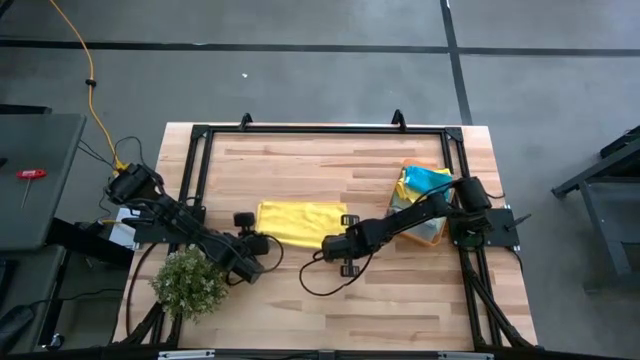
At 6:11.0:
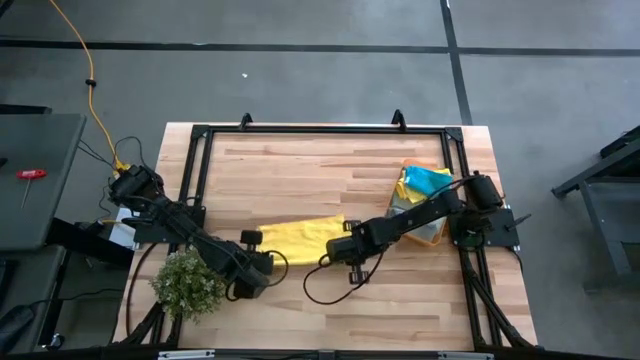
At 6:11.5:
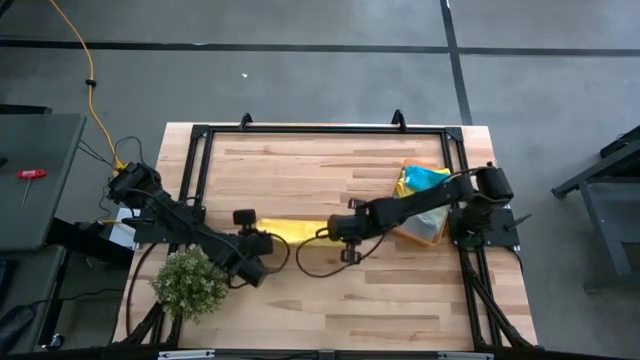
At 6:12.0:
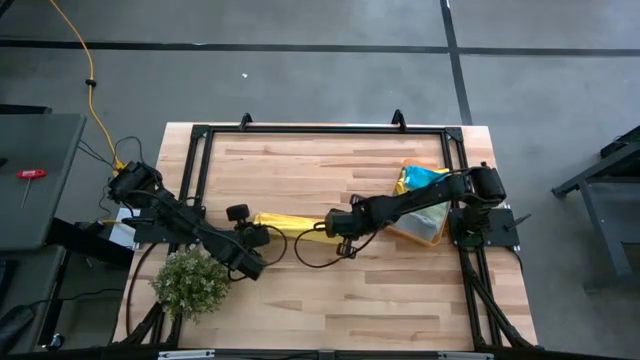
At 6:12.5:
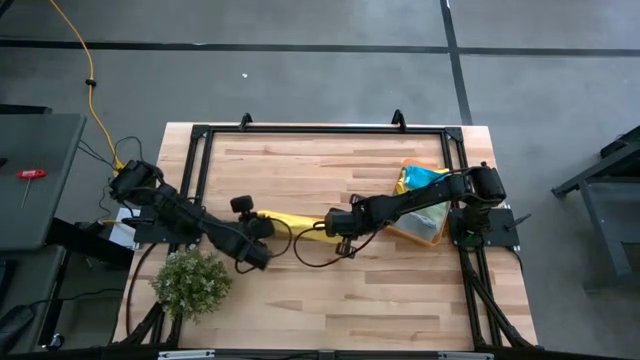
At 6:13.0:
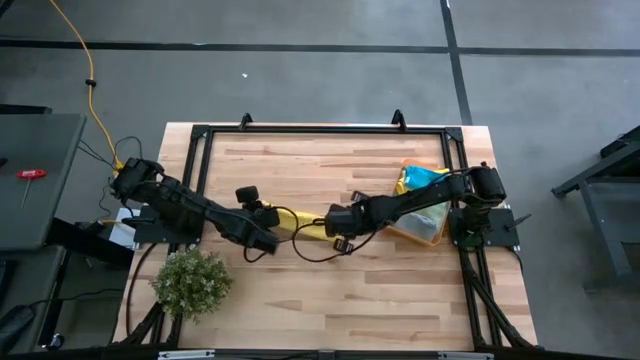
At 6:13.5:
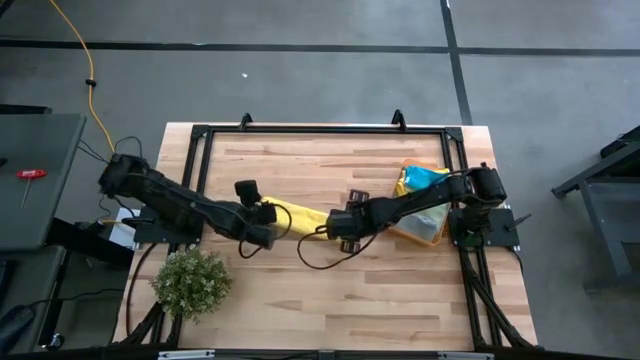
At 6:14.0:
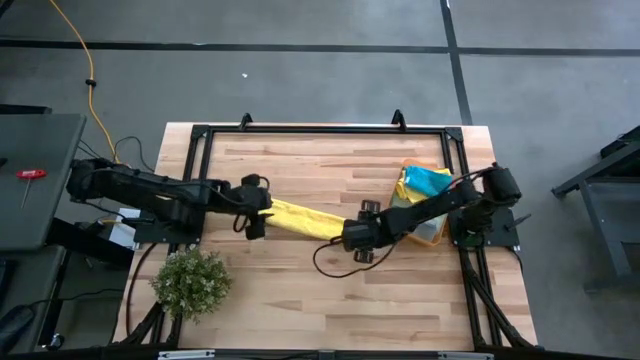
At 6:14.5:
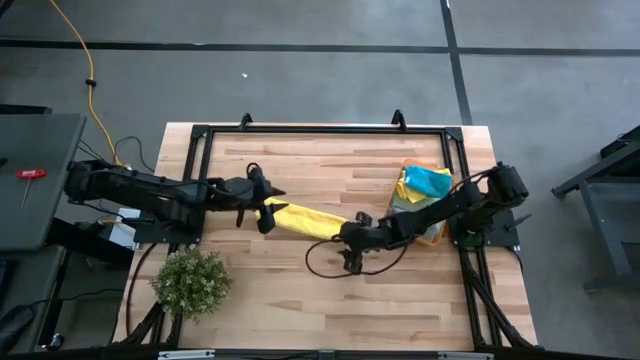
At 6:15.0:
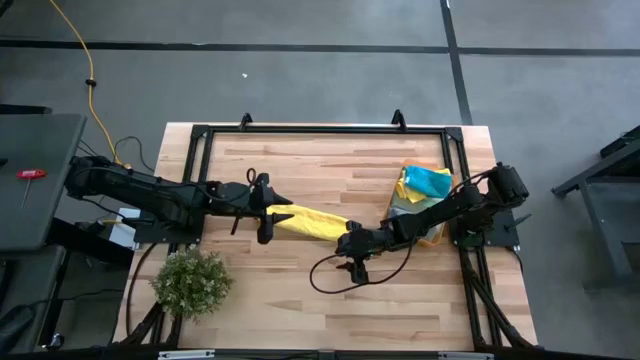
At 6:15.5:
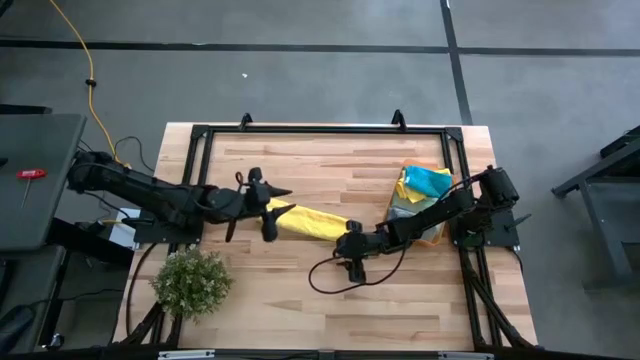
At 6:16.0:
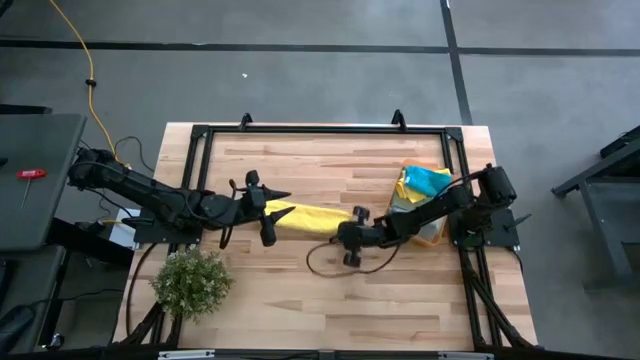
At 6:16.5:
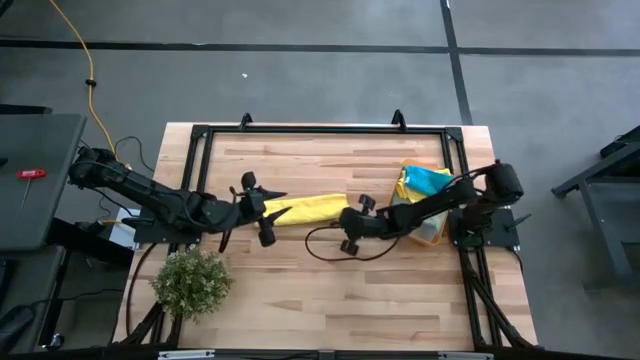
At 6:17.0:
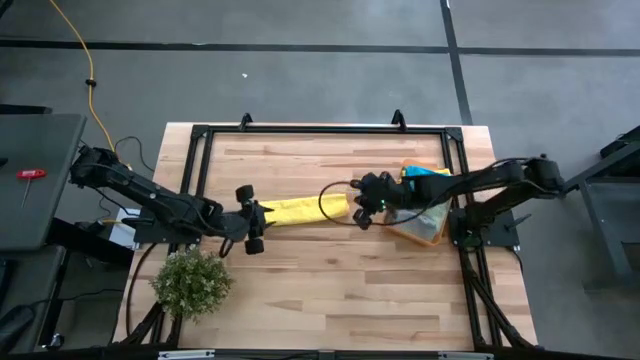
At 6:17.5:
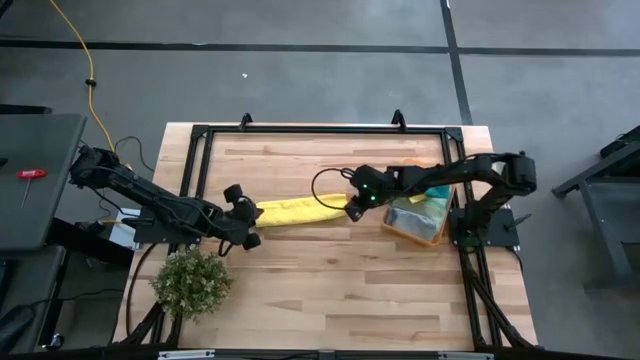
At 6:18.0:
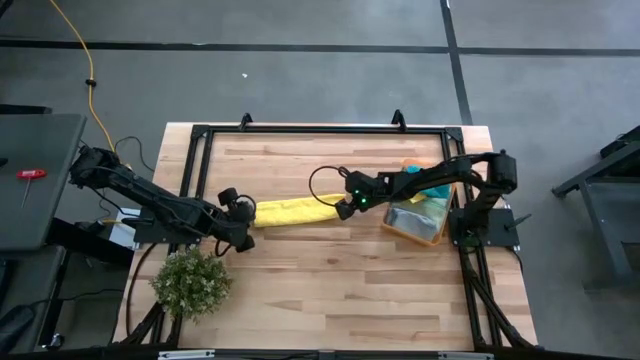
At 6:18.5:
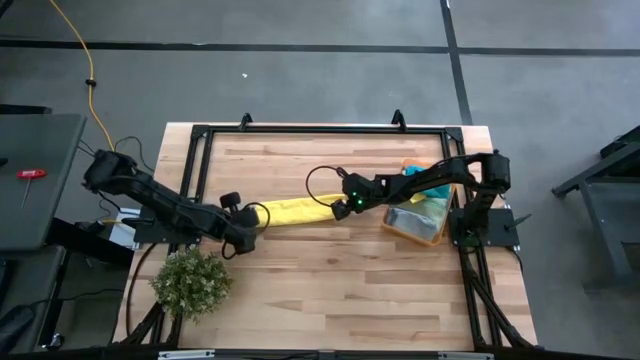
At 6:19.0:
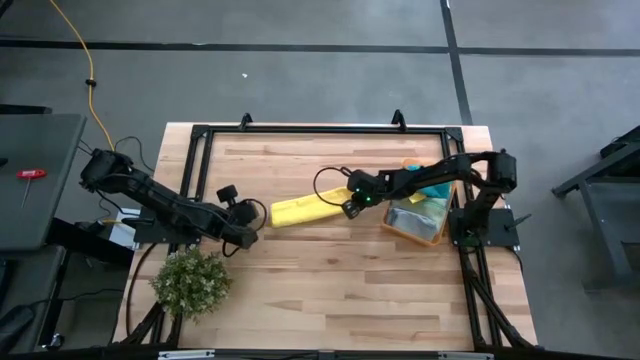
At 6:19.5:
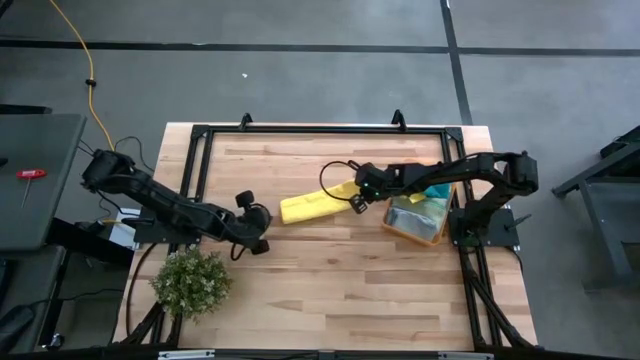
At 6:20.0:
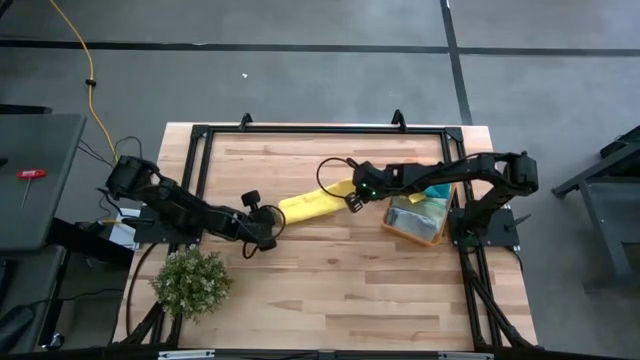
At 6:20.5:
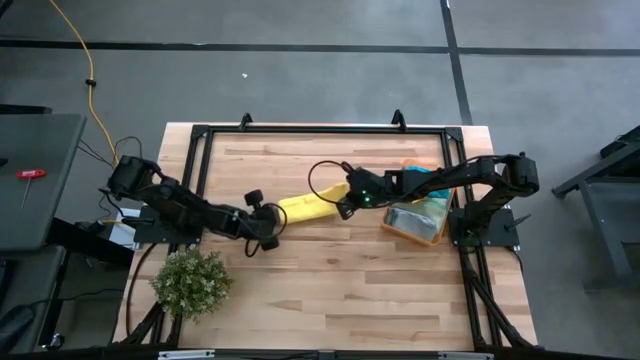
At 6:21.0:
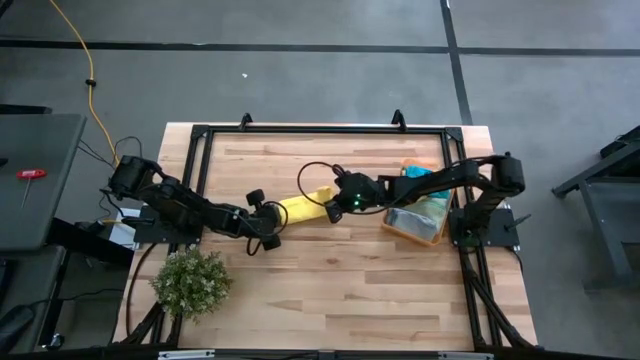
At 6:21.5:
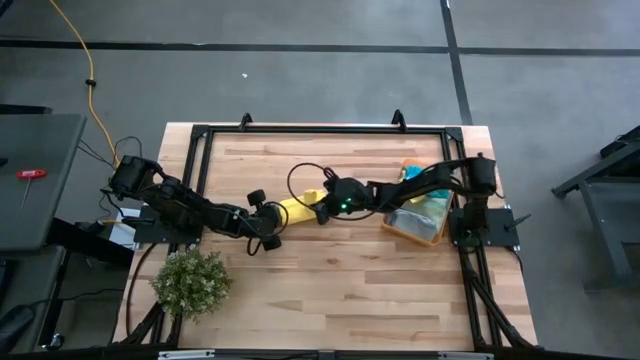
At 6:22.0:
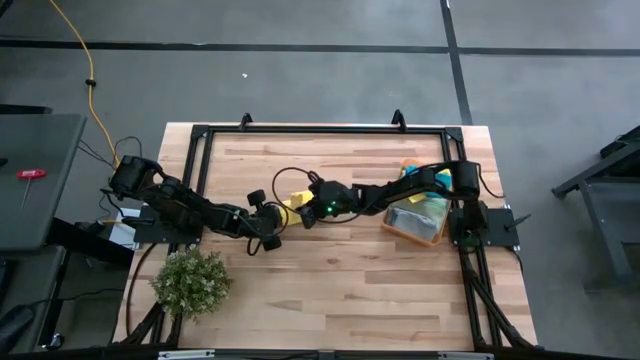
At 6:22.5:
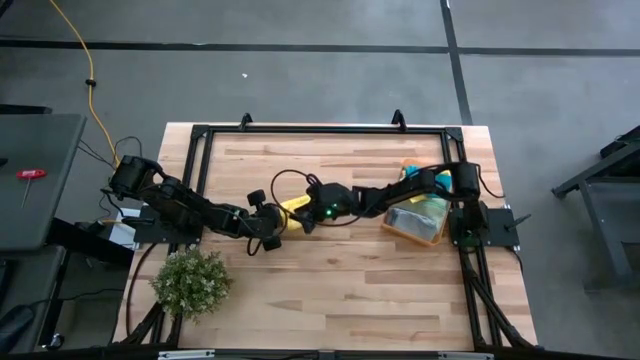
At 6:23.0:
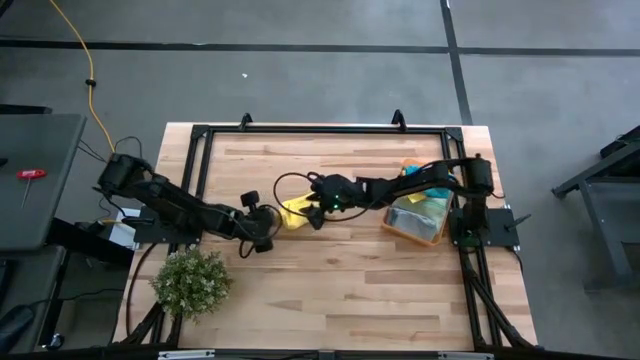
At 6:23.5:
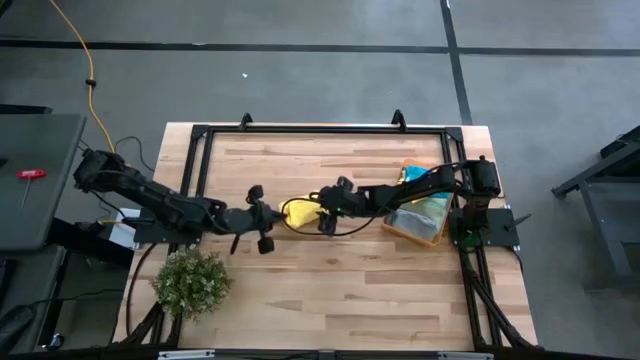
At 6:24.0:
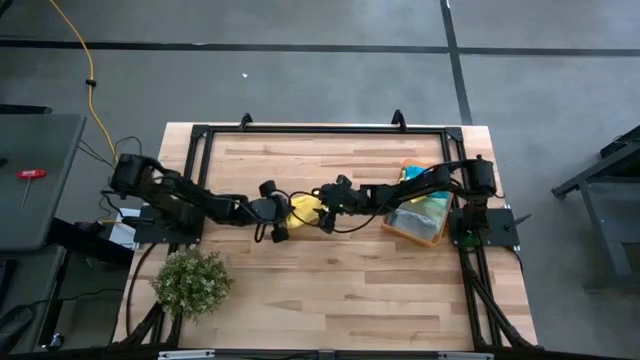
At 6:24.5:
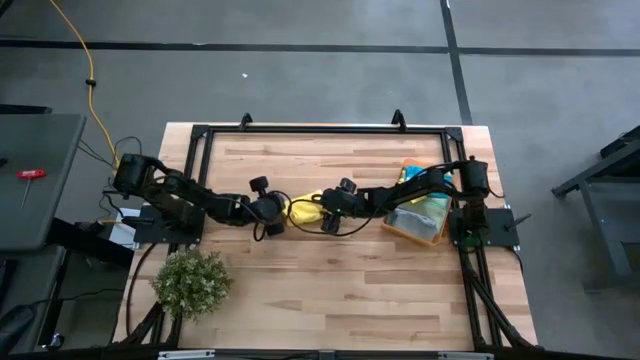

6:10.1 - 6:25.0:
Task: Fold microfiber towels
Fold the yellow microfiber cloth

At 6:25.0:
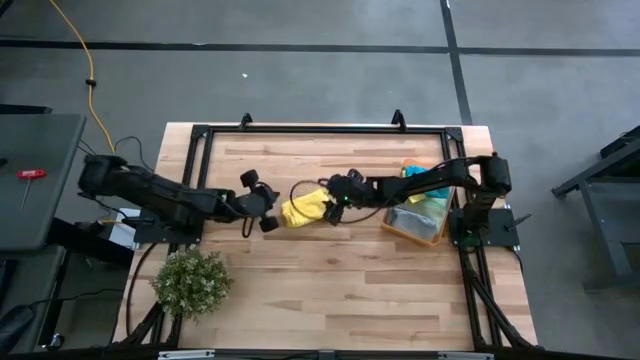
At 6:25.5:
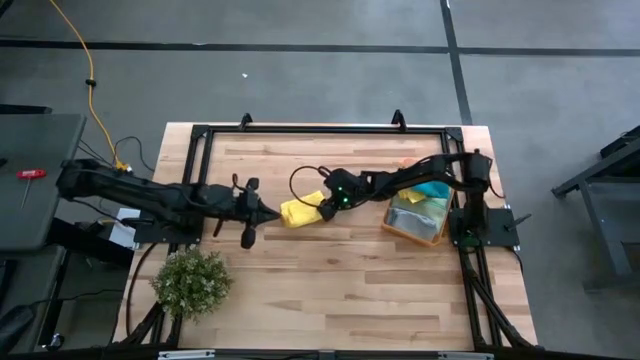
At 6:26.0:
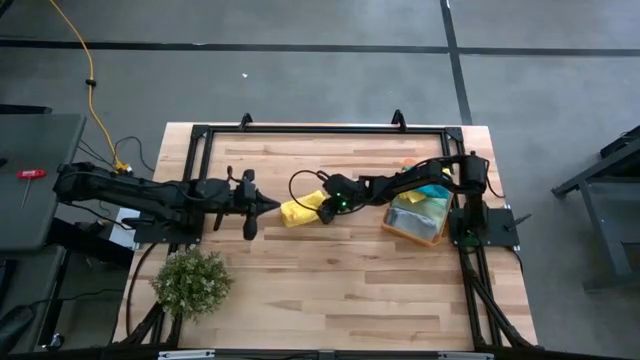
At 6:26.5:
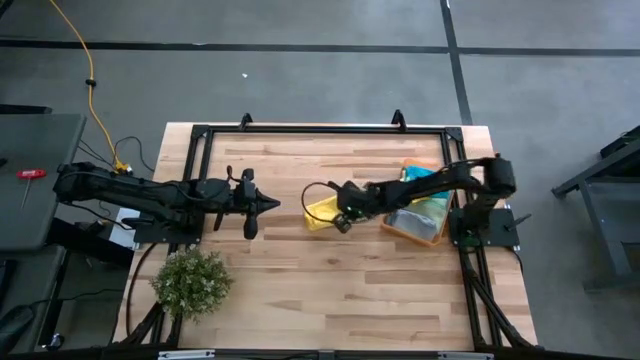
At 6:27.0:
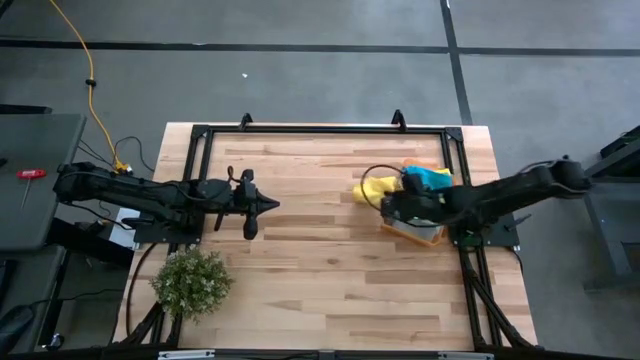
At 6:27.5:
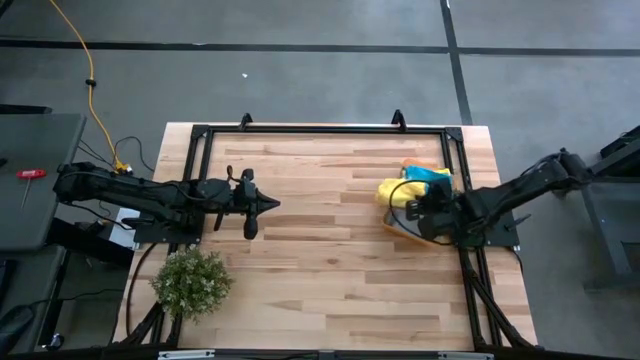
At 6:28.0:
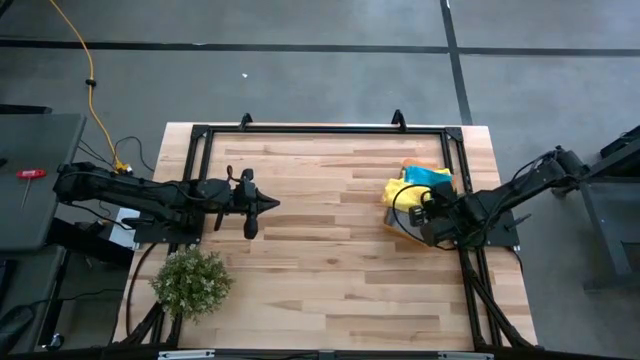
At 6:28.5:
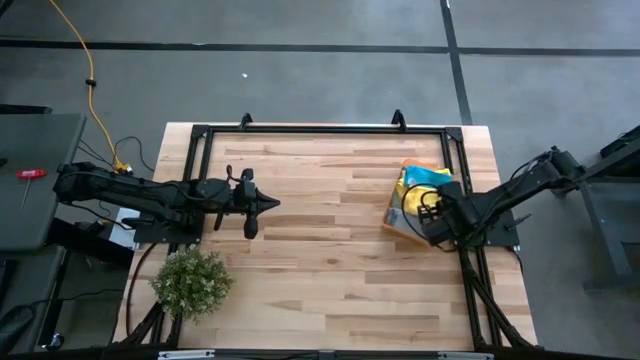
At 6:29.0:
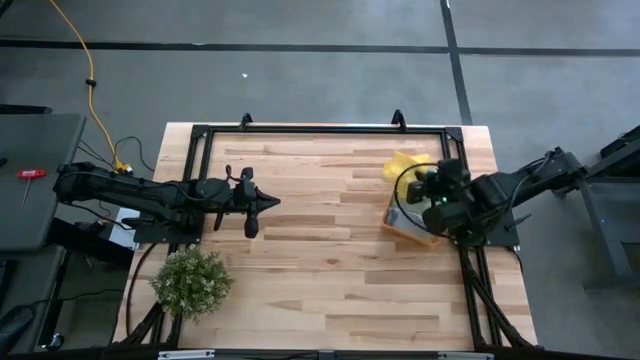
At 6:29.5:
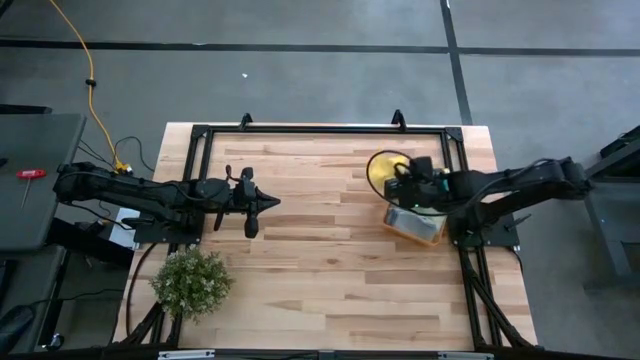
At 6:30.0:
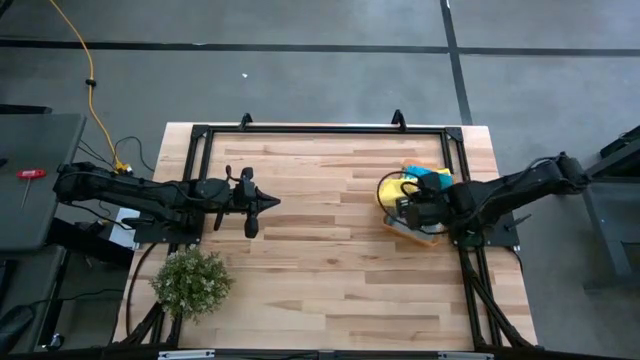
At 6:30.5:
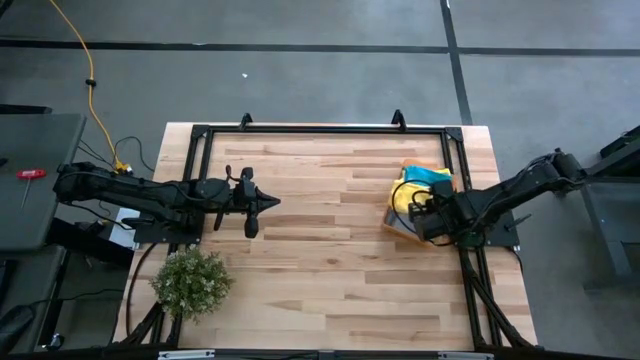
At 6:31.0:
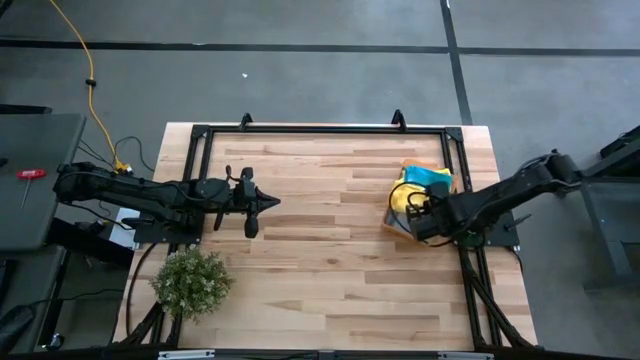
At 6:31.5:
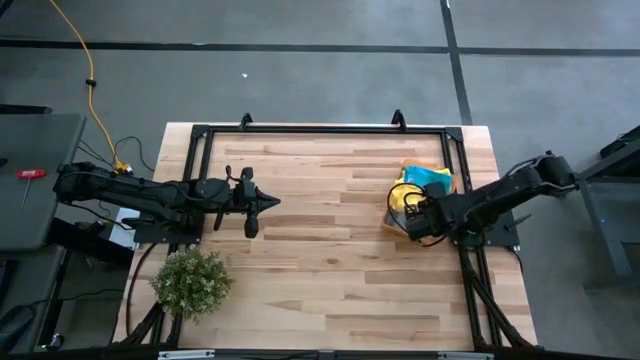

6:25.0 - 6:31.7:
Put the folded yellow microfiber cloth into the orange bin
